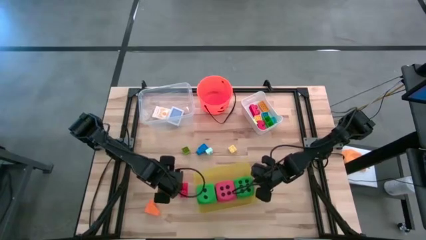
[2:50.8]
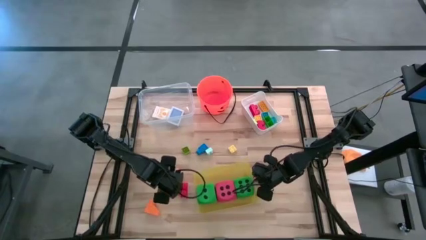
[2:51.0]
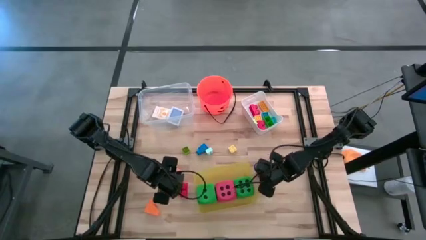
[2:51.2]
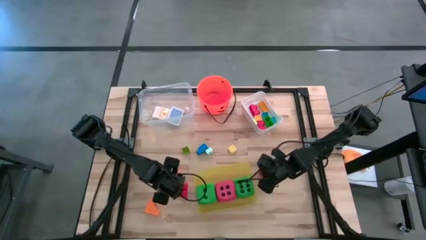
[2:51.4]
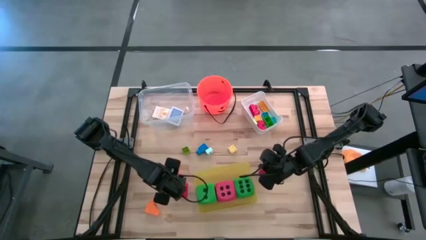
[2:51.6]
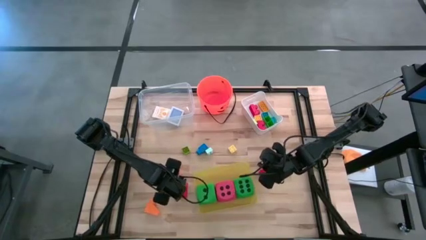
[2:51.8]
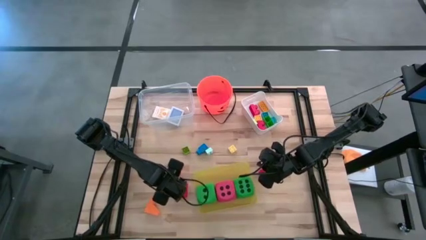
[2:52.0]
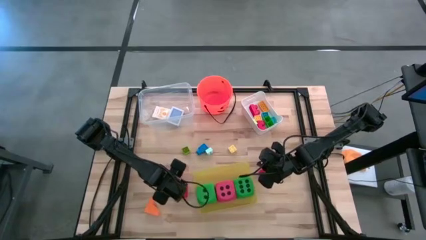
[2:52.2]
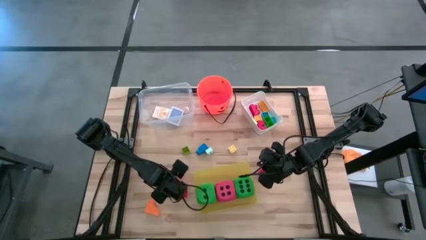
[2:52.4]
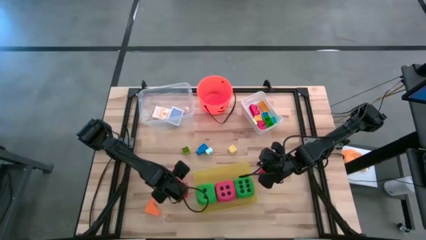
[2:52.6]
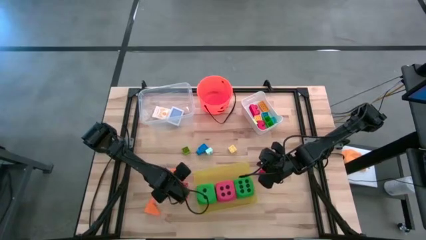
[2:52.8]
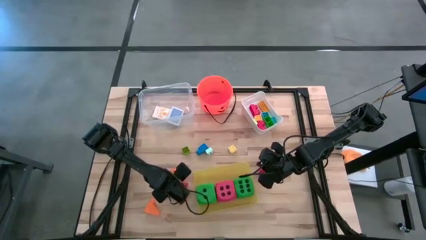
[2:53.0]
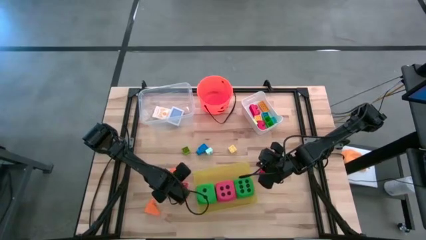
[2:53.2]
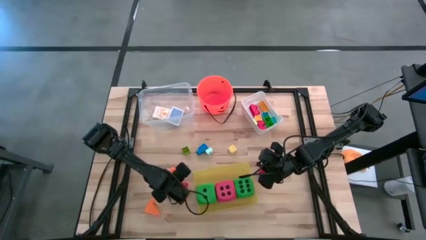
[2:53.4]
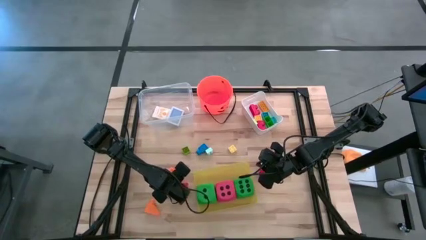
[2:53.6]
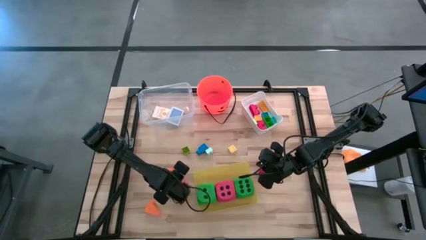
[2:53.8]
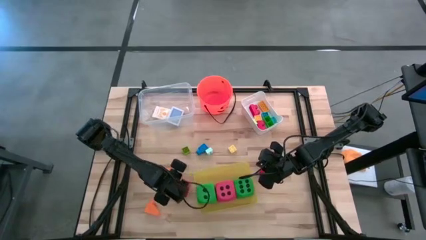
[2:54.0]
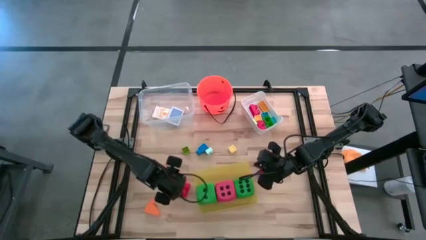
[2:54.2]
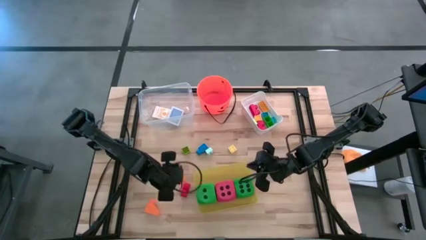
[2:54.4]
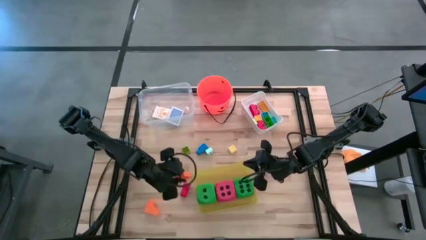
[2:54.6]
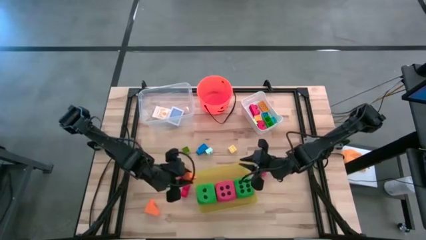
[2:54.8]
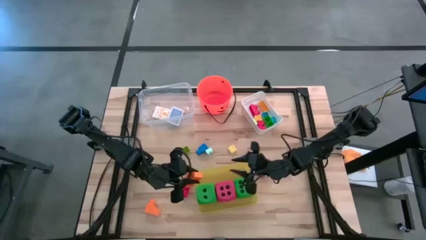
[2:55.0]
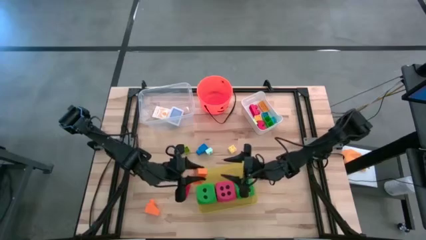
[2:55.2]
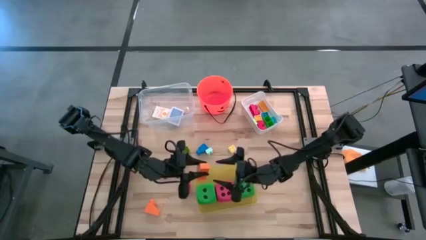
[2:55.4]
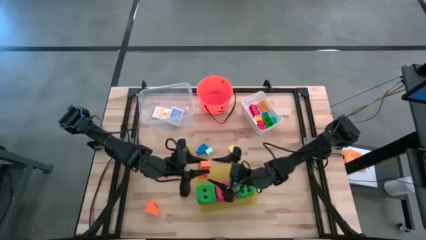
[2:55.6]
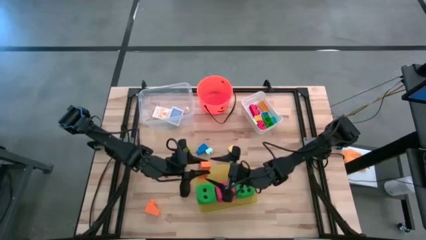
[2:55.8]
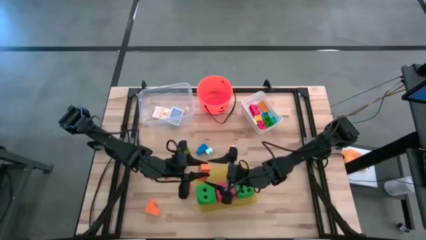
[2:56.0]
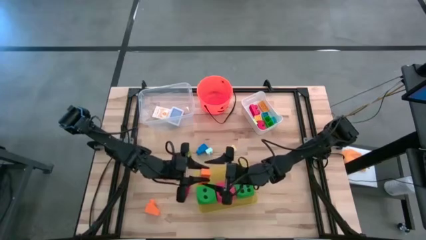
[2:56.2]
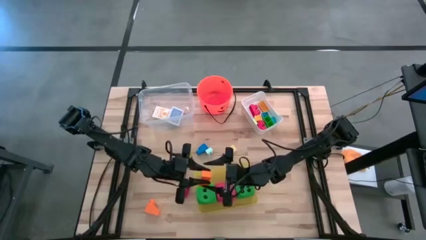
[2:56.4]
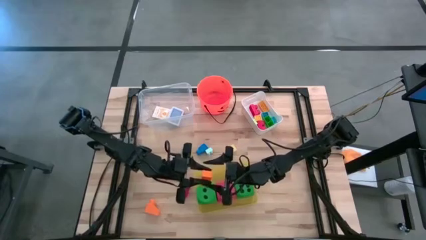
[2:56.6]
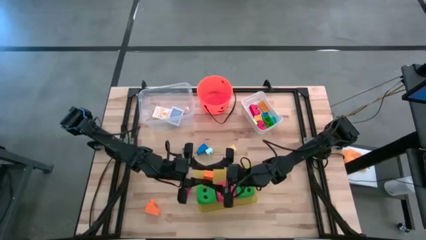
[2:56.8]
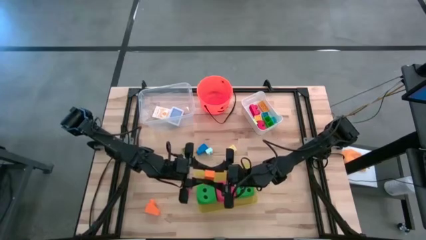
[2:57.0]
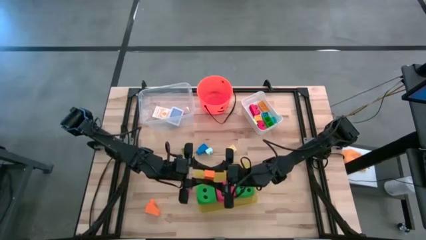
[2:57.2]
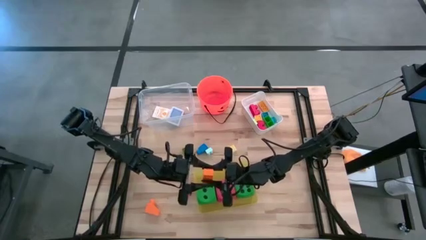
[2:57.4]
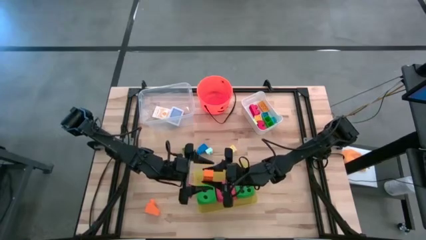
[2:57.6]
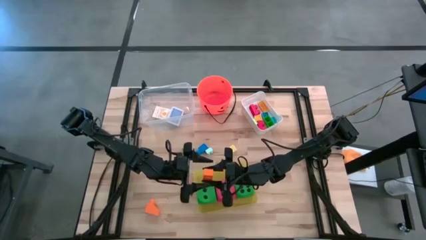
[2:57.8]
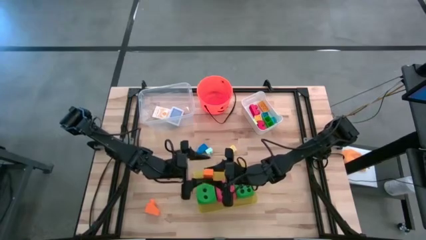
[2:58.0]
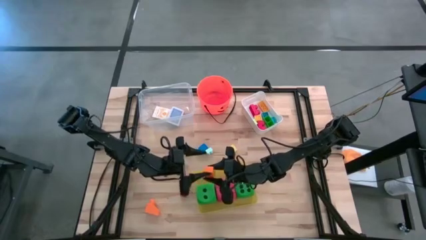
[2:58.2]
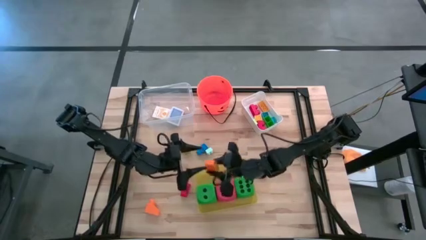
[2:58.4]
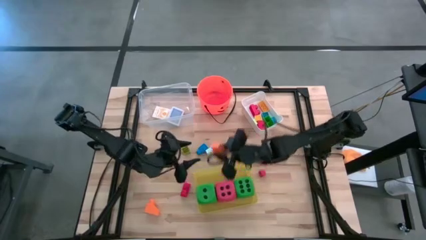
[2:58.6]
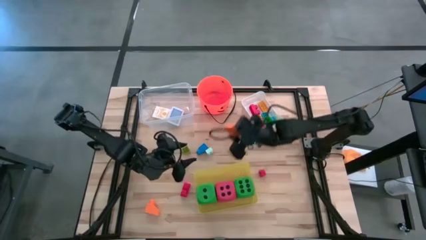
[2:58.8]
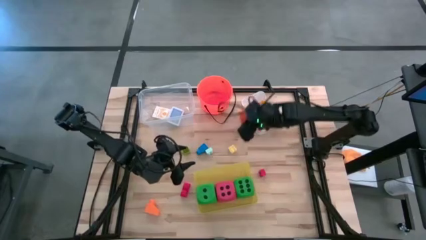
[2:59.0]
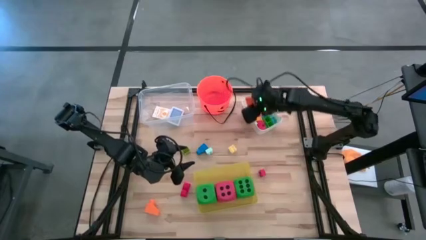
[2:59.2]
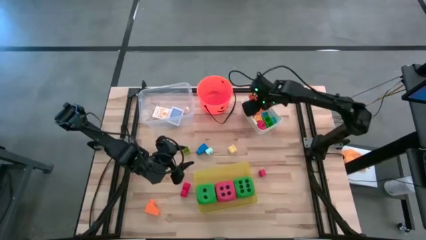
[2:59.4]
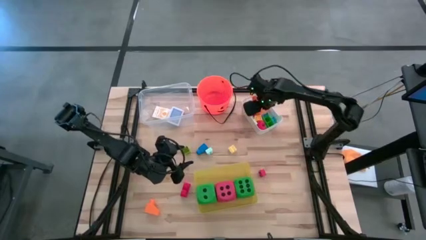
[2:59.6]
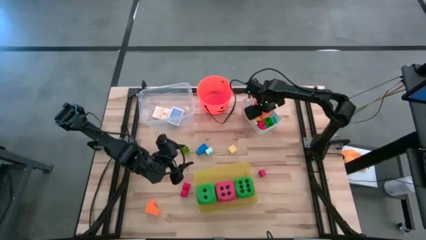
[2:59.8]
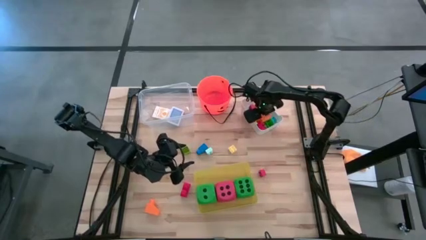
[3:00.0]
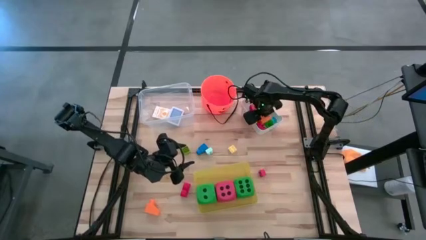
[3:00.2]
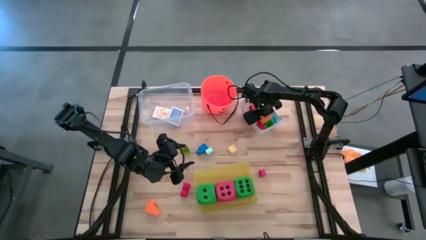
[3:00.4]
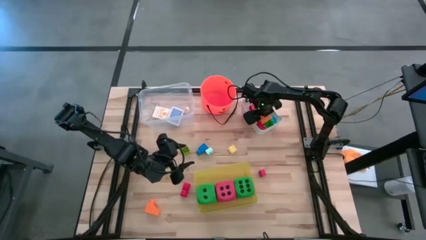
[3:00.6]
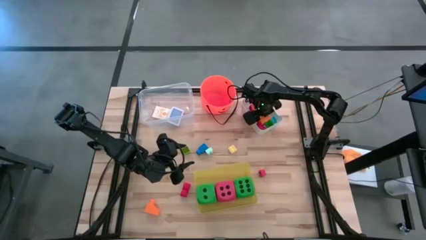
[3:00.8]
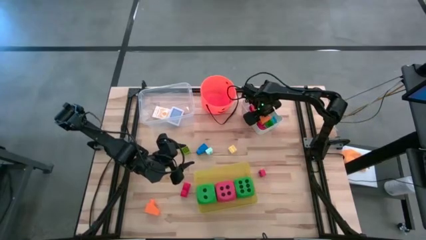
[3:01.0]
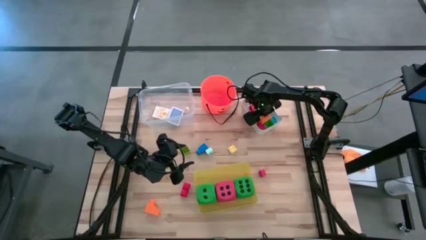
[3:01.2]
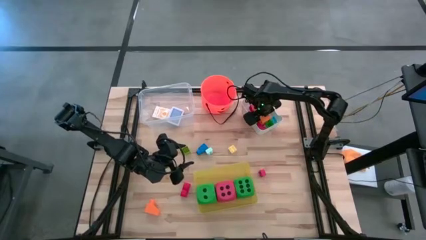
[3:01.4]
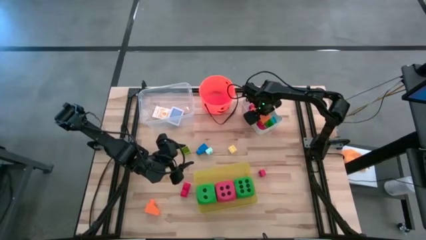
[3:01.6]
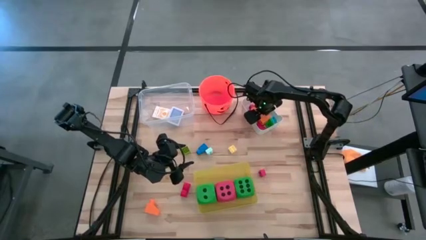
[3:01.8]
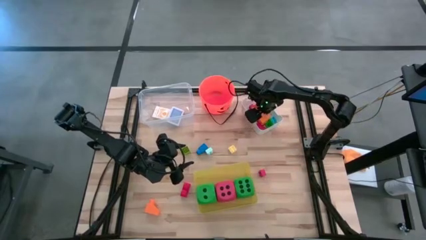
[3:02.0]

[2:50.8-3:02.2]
Task: Pick & Place Toys
Put the orange game piece into the white bin

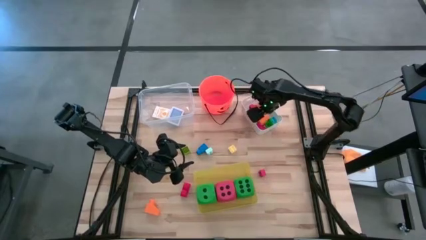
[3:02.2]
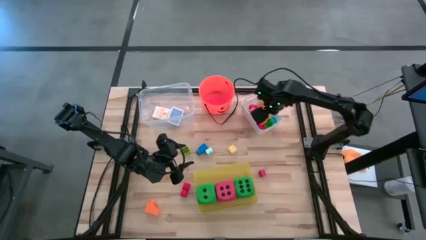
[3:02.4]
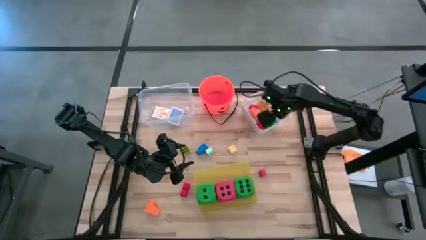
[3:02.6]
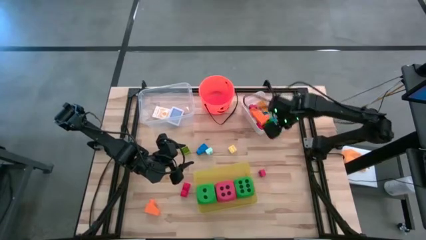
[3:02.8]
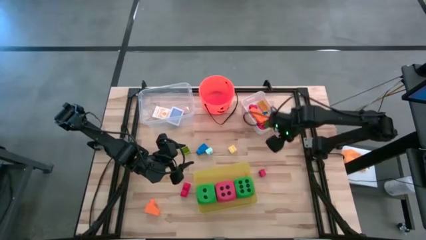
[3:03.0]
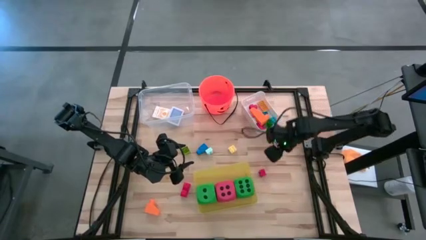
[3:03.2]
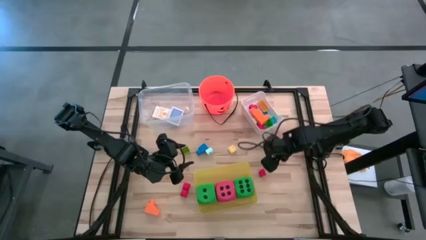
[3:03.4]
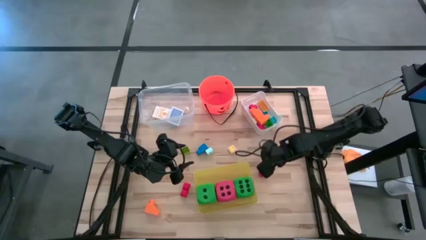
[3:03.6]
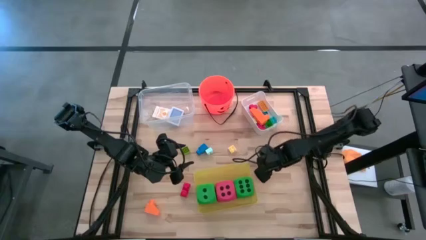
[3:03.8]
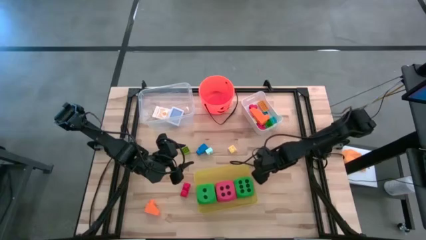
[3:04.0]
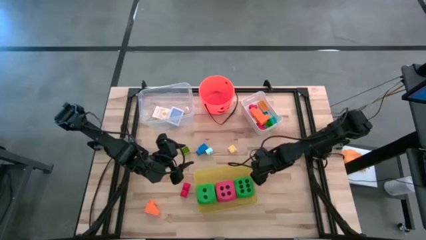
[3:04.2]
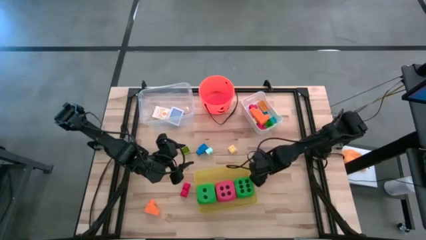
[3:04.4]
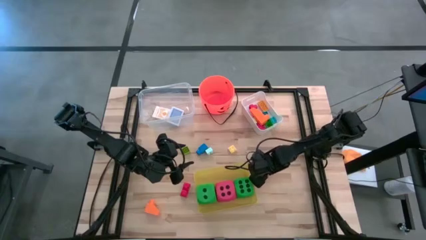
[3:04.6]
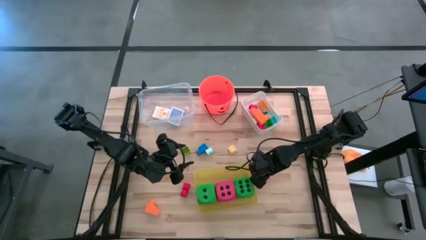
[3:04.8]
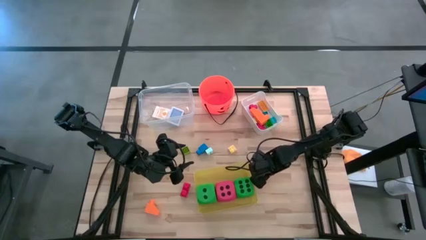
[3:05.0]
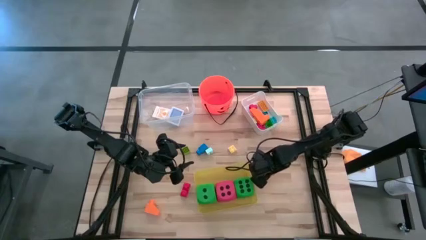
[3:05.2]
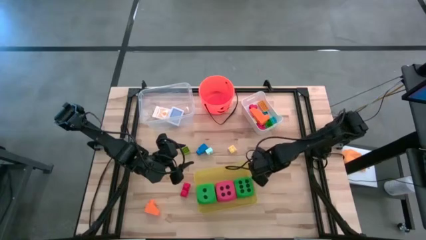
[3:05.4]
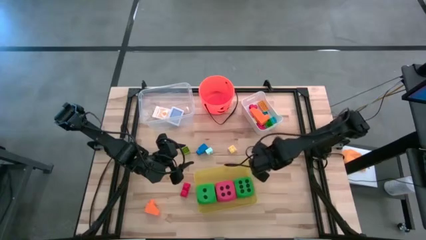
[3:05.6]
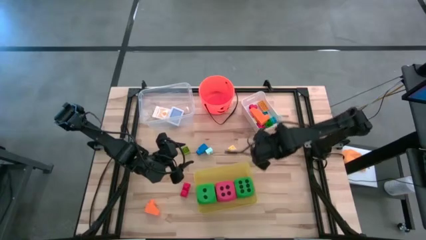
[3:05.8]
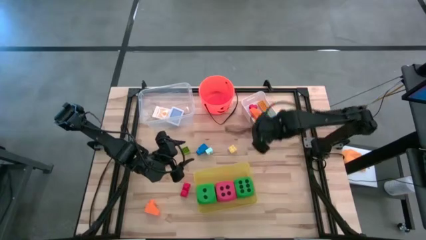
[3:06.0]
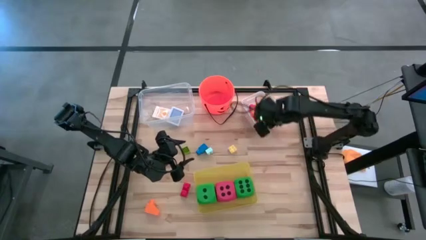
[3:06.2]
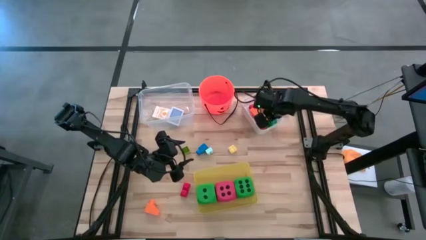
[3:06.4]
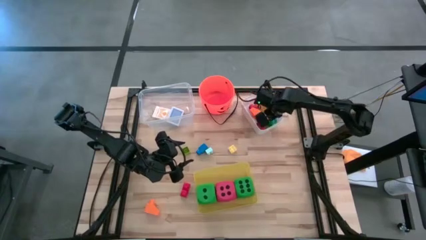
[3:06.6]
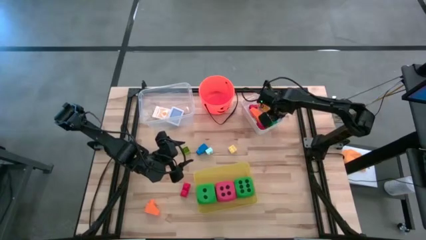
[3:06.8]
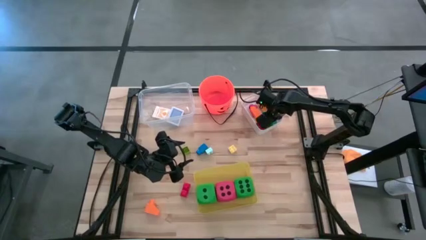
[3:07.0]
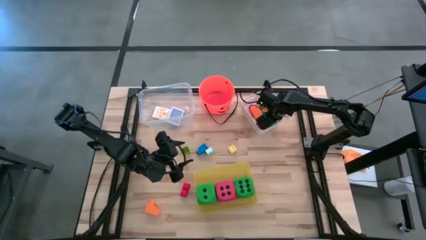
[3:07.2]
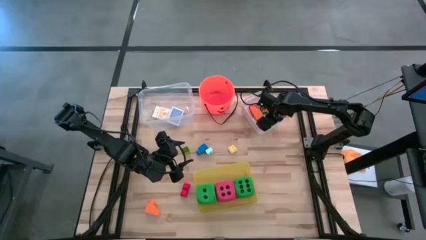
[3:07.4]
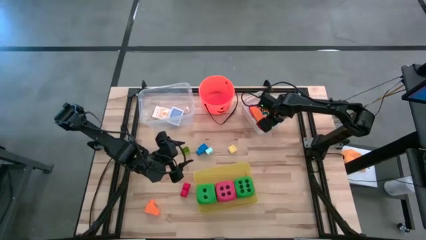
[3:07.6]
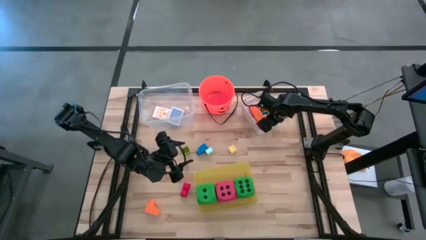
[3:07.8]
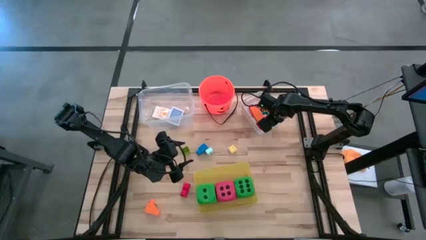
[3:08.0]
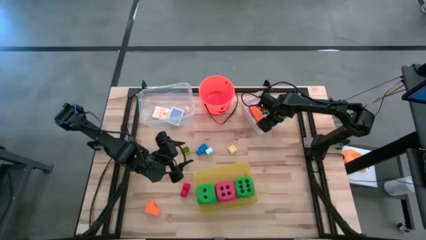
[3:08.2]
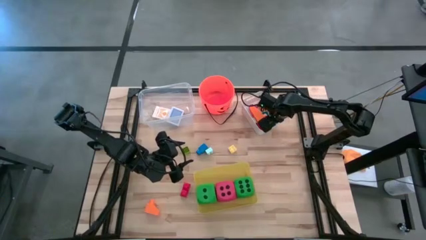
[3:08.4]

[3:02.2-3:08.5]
Put the red game piece into the white bin
